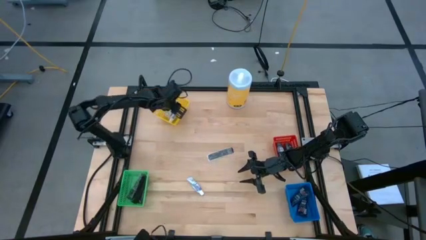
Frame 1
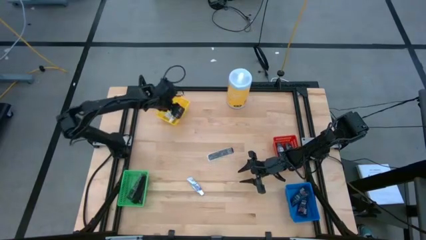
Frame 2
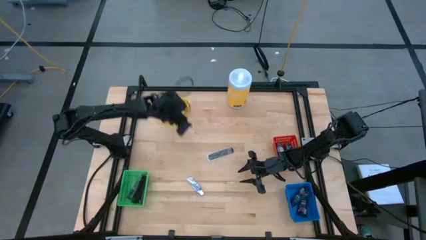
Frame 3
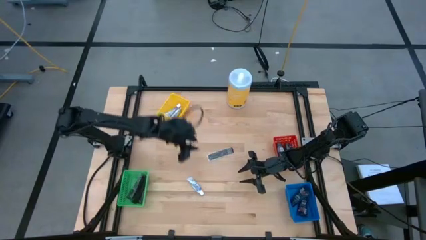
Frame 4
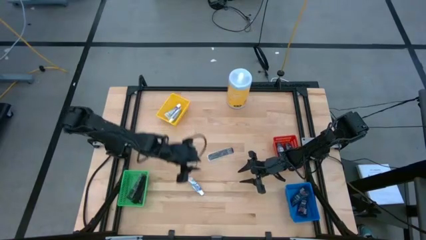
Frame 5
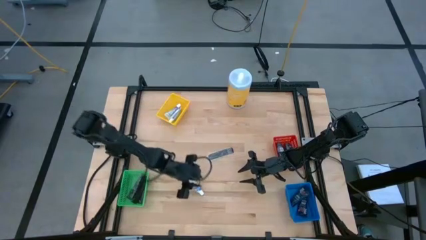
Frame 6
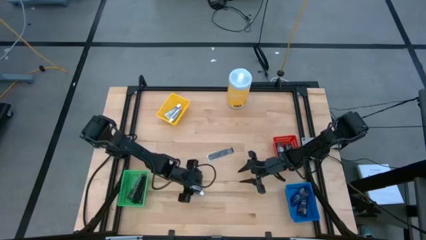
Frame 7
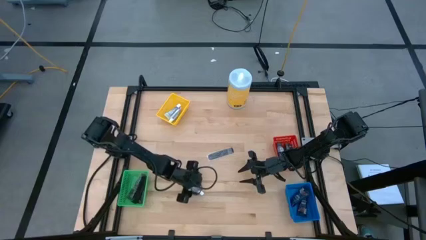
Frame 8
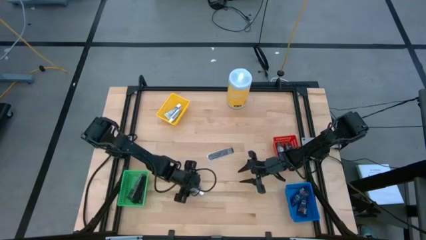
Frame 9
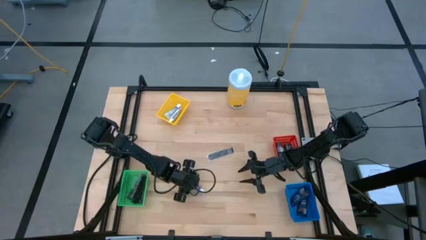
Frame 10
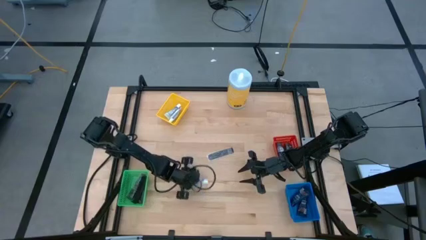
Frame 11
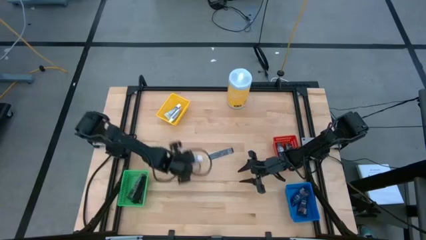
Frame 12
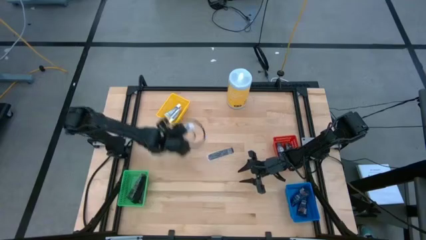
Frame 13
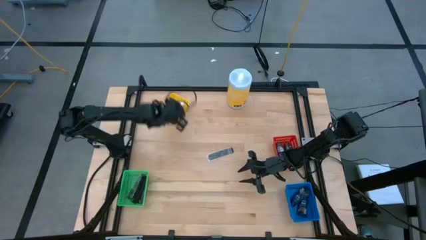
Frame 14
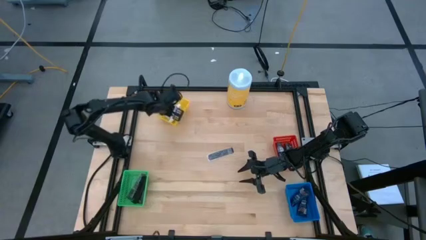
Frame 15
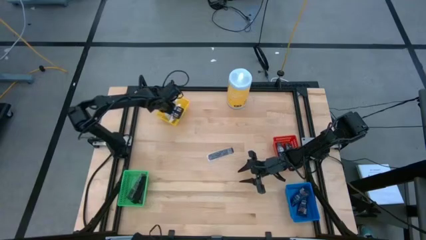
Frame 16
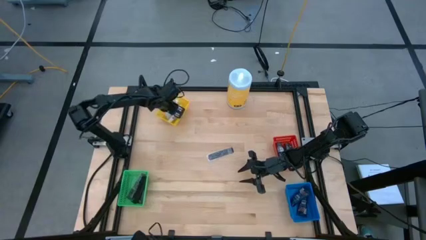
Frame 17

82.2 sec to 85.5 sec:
Task: Pick & Place Travel size toiletries
Put the toothpaste into the bin

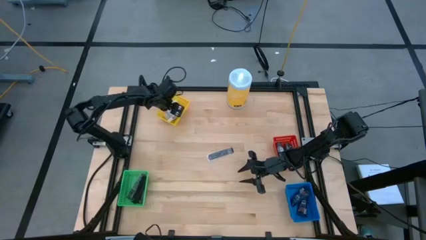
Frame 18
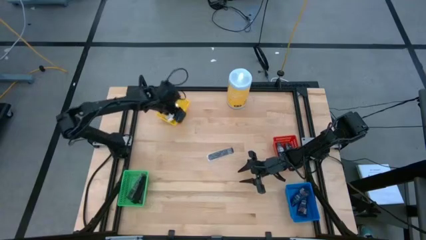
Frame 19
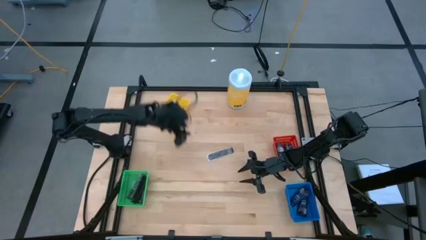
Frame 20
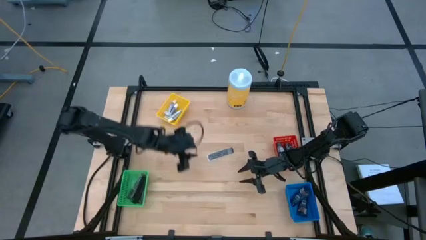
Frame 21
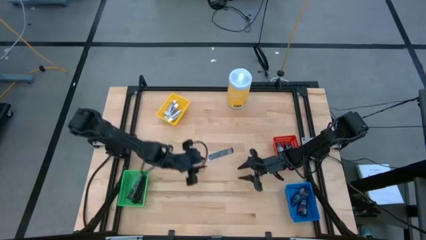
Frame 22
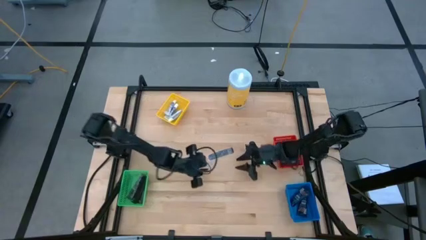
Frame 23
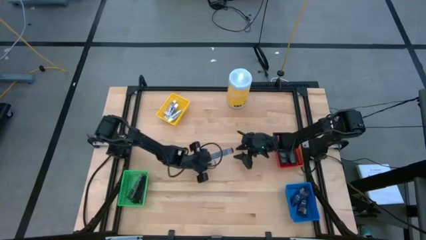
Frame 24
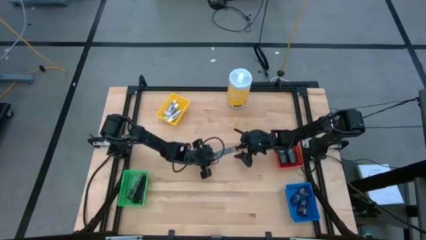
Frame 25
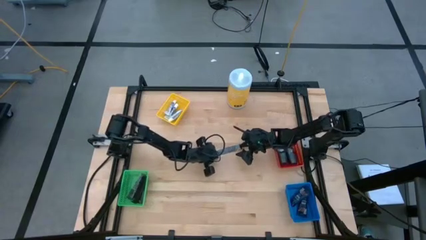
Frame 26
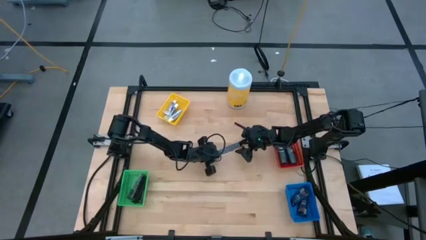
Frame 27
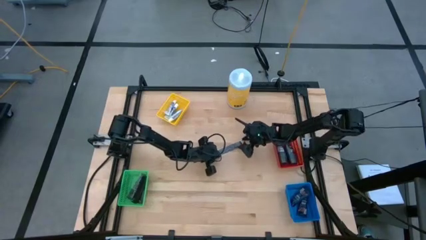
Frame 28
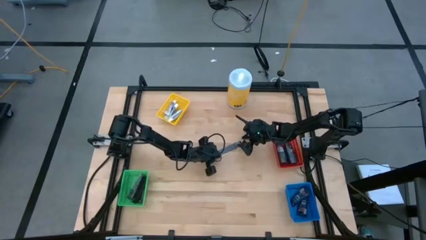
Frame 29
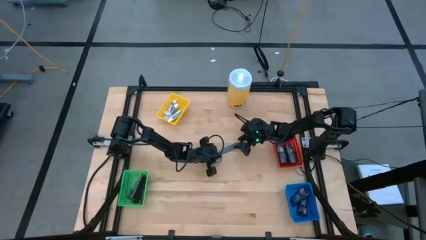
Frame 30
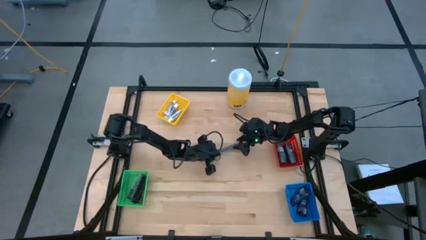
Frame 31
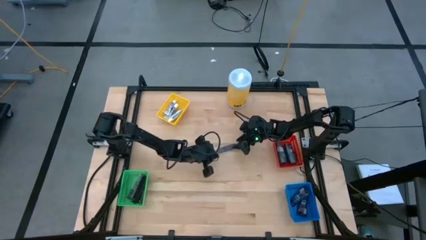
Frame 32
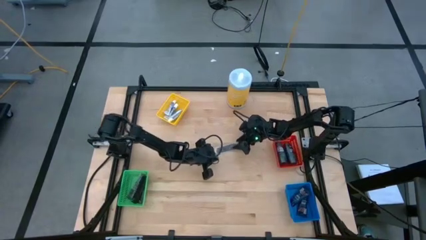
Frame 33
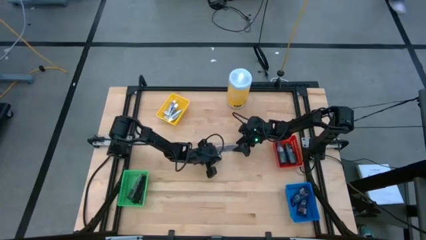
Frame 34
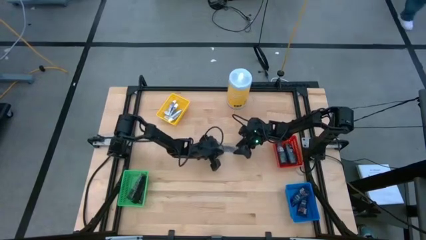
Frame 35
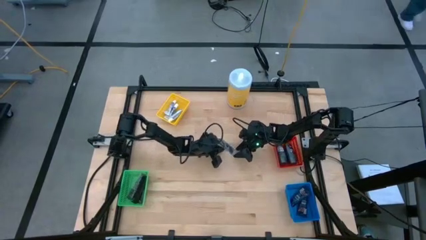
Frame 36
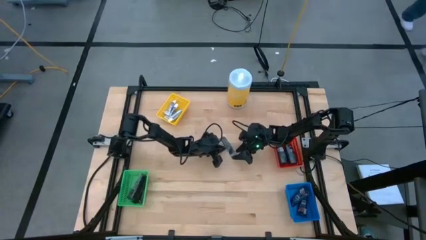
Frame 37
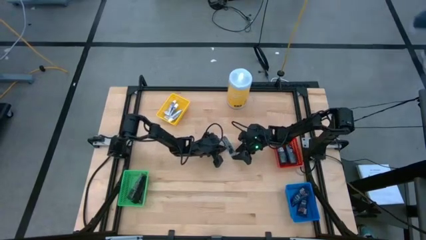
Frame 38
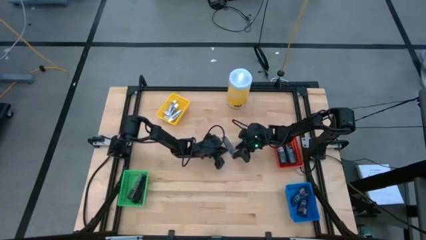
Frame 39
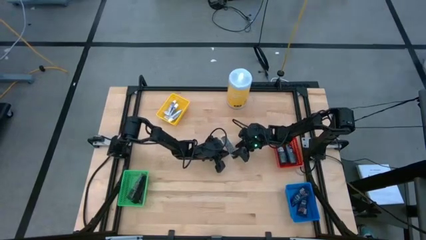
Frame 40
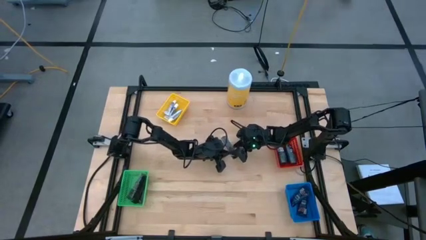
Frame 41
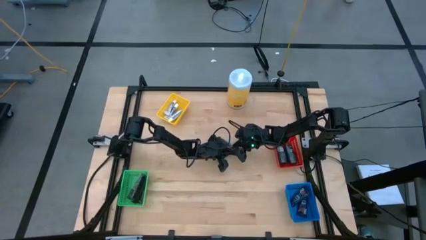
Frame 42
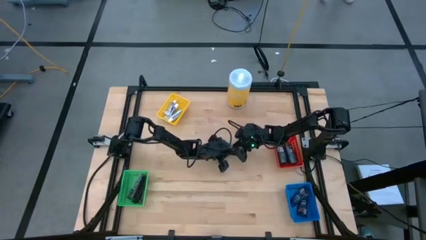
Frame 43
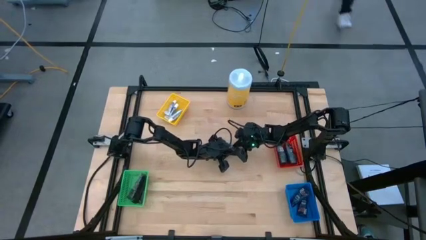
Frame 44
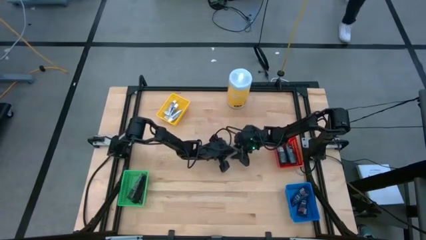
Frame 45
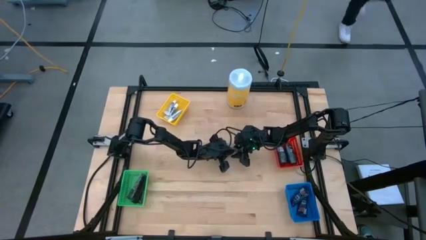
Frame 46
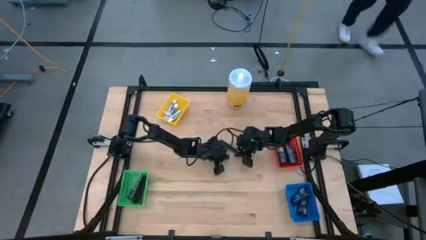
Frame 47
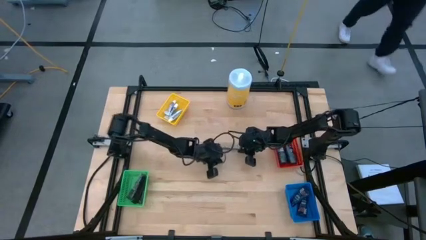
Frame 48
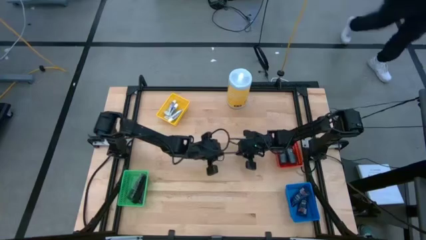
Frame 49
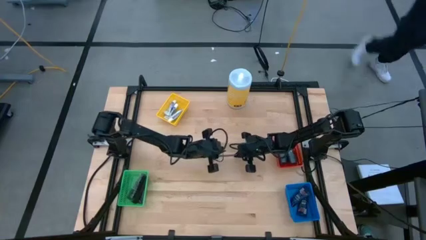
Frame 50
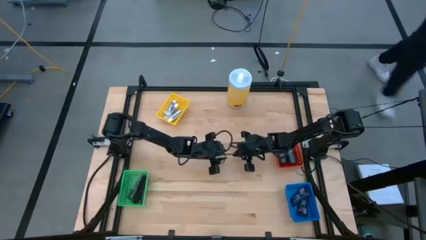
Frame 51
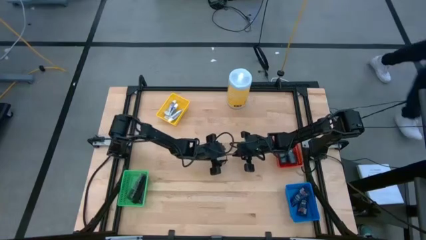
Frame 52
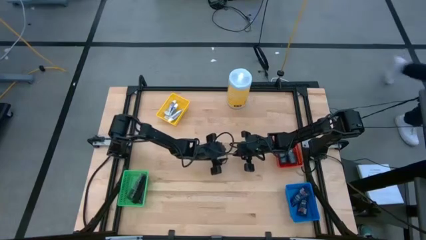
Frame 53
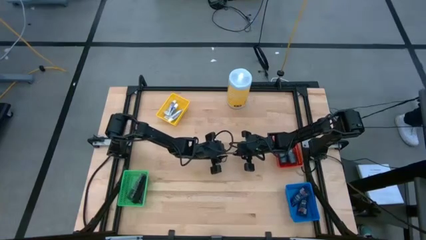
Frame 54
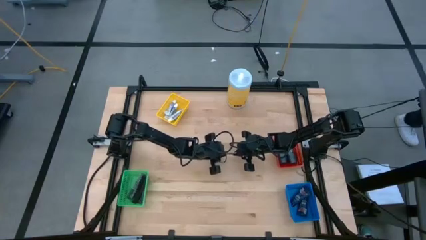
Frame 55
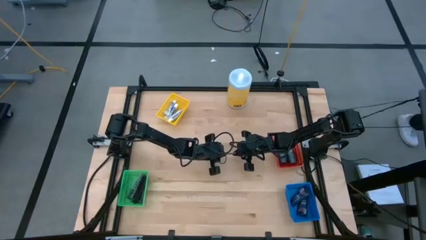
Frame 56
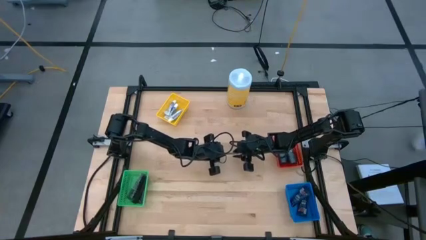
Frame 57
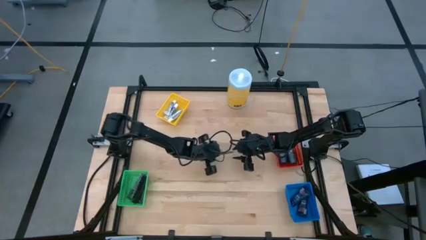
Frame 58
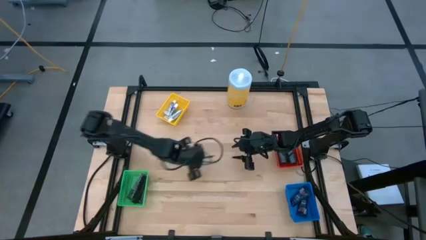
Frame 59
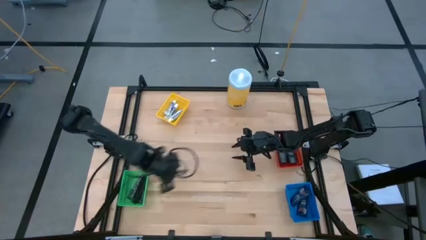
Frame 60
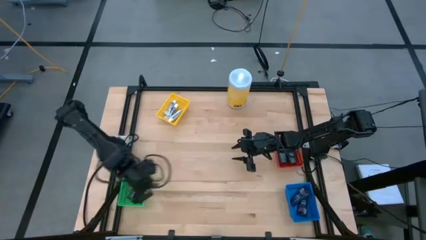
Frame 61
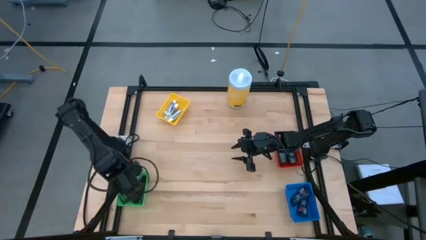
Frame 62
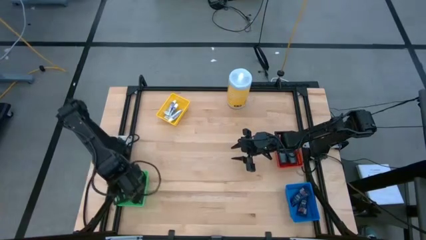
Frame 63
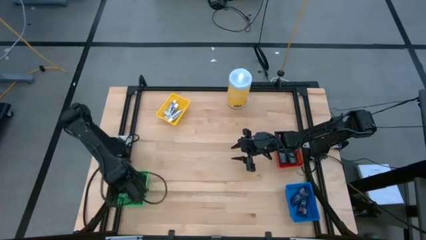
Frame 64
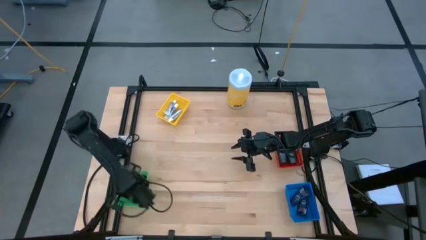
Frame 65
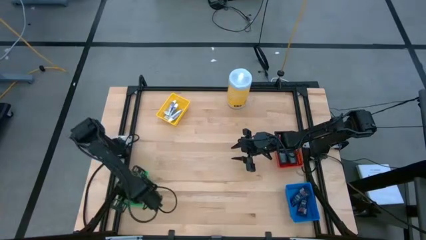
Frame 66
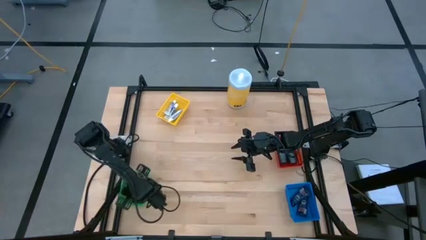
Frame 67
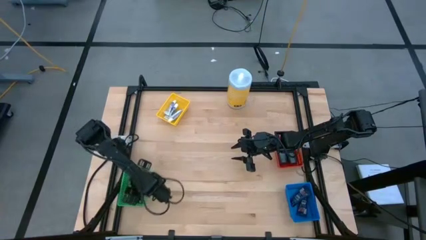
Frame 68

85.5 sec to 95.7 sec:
Put the black comb into the green bin
